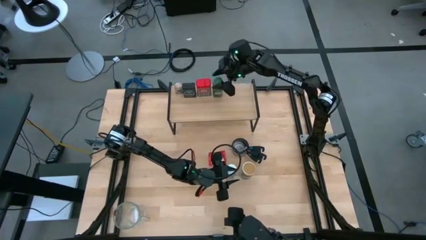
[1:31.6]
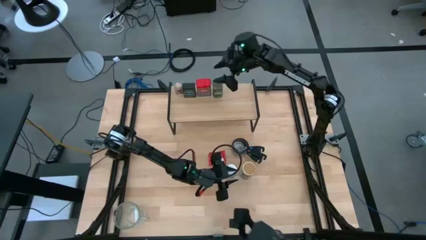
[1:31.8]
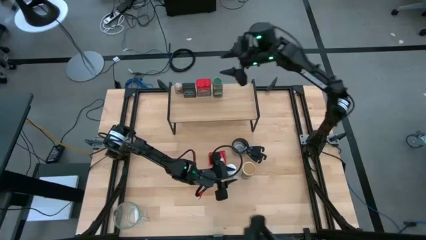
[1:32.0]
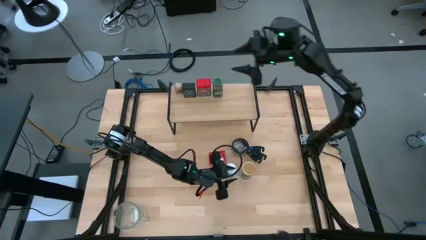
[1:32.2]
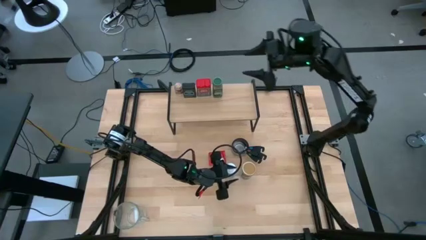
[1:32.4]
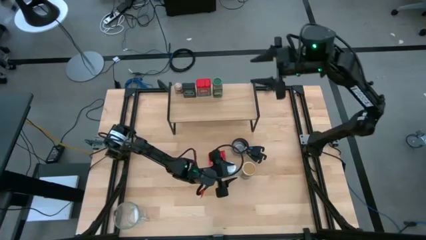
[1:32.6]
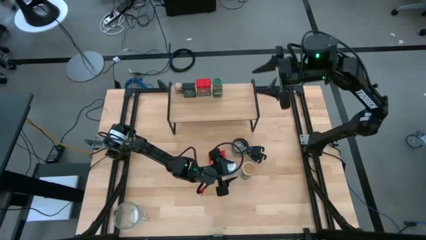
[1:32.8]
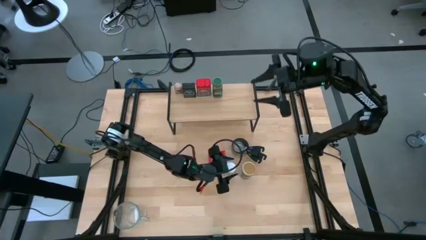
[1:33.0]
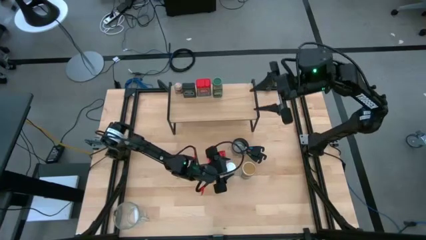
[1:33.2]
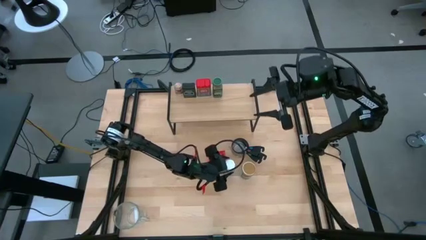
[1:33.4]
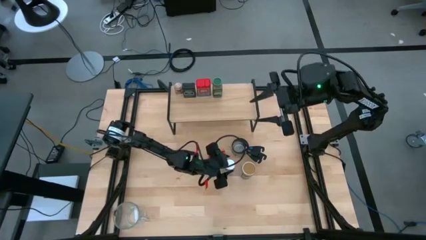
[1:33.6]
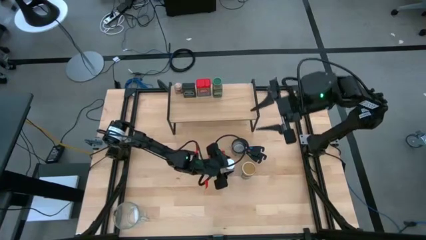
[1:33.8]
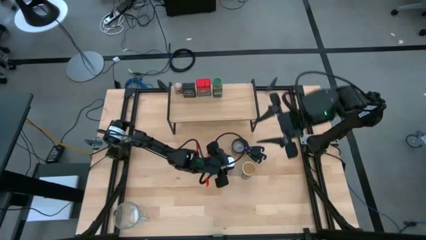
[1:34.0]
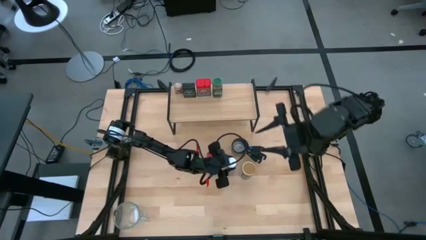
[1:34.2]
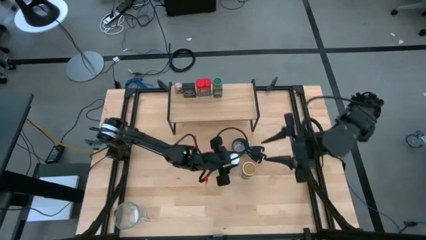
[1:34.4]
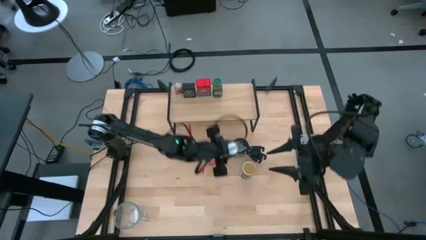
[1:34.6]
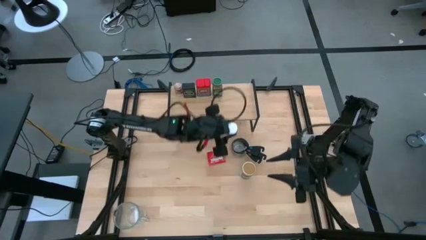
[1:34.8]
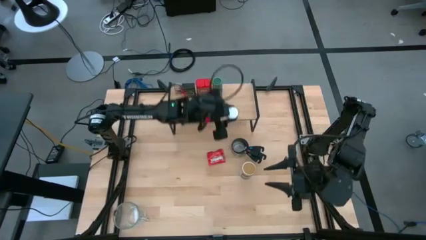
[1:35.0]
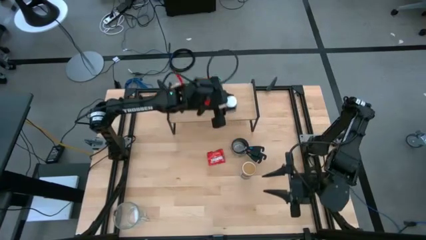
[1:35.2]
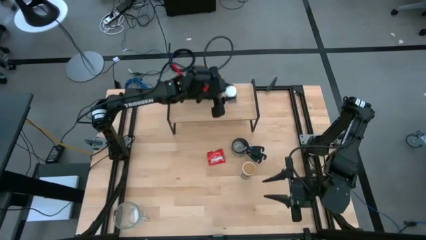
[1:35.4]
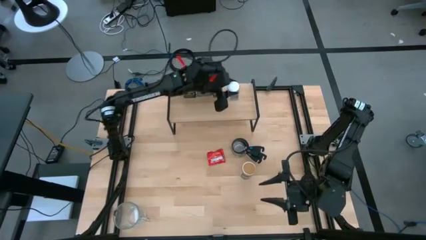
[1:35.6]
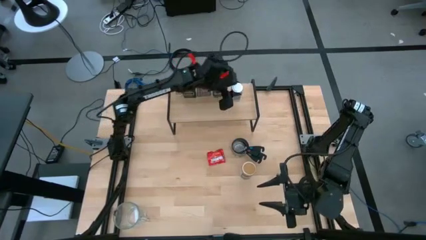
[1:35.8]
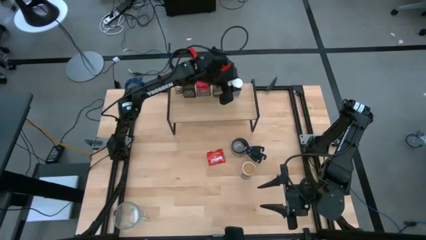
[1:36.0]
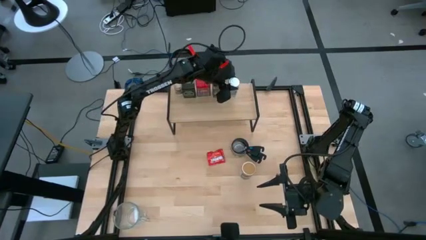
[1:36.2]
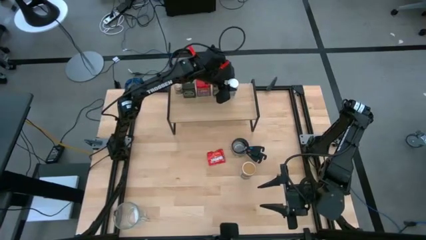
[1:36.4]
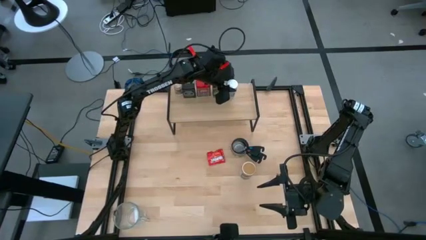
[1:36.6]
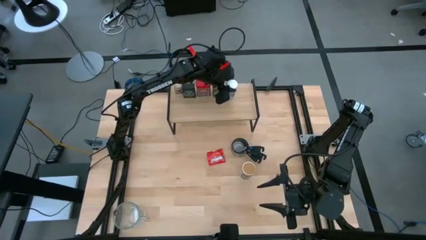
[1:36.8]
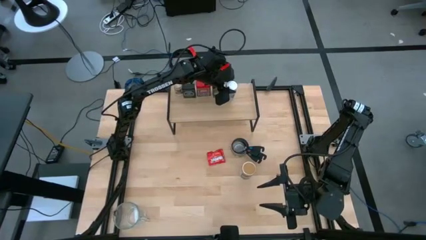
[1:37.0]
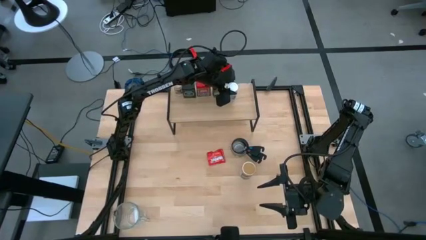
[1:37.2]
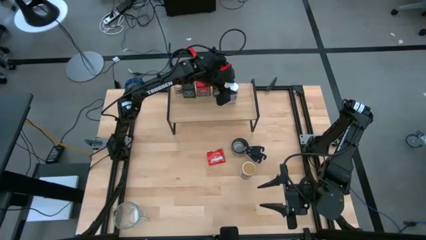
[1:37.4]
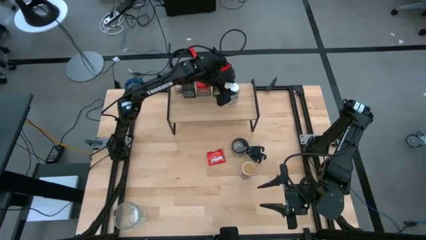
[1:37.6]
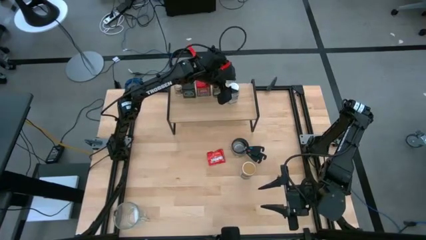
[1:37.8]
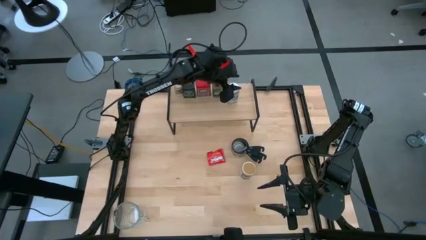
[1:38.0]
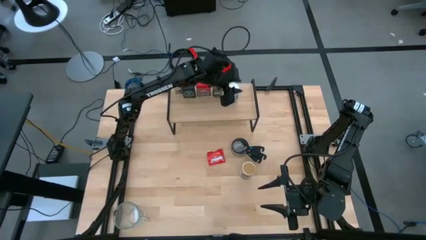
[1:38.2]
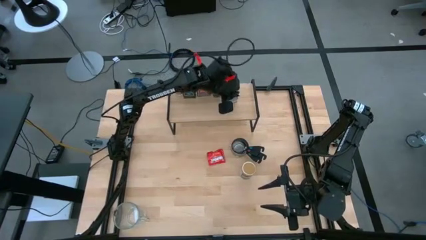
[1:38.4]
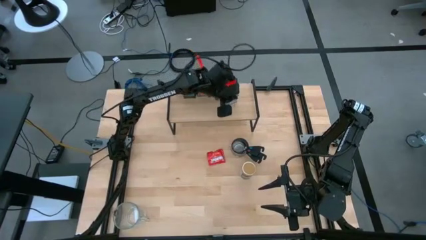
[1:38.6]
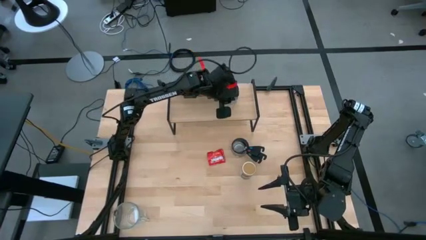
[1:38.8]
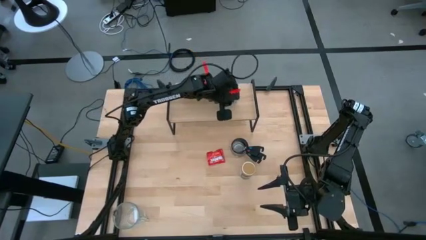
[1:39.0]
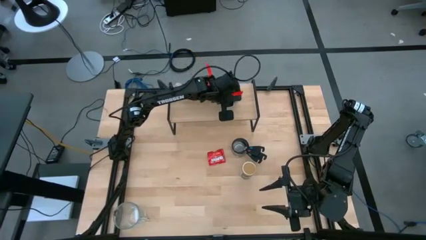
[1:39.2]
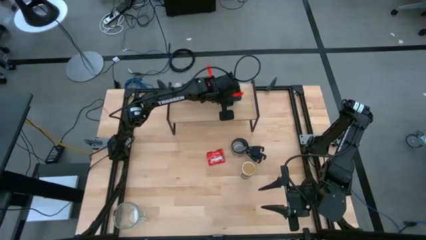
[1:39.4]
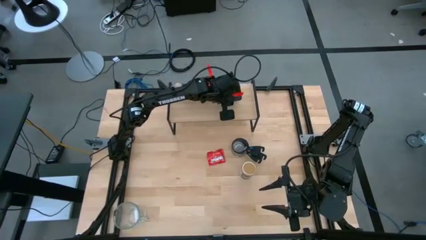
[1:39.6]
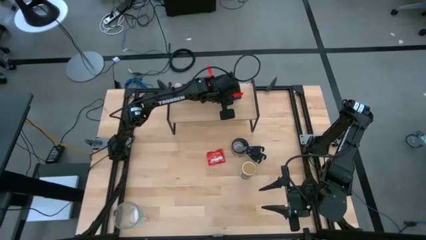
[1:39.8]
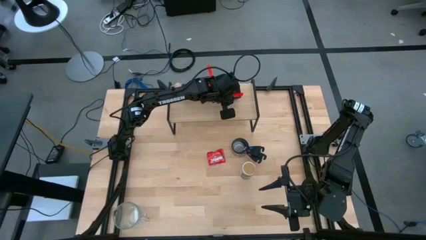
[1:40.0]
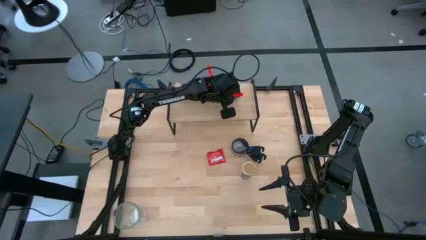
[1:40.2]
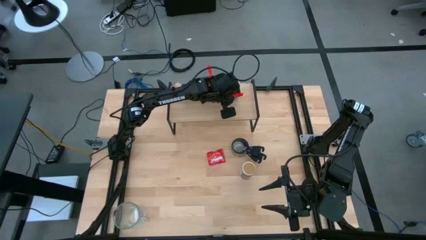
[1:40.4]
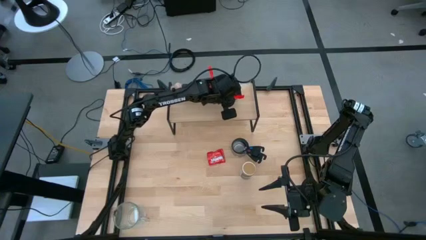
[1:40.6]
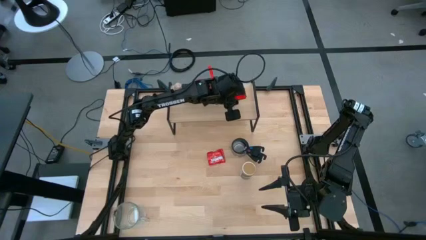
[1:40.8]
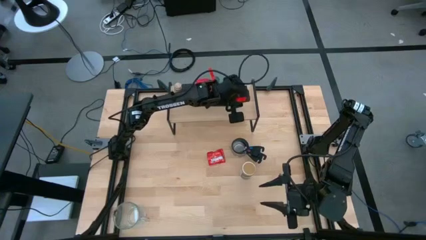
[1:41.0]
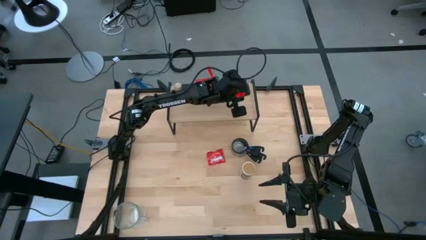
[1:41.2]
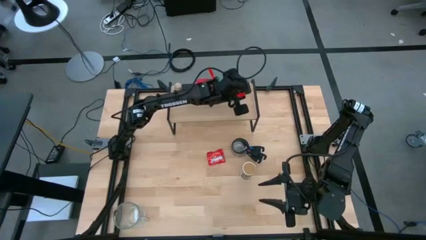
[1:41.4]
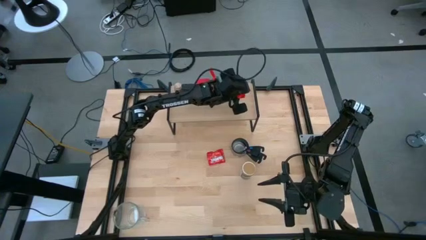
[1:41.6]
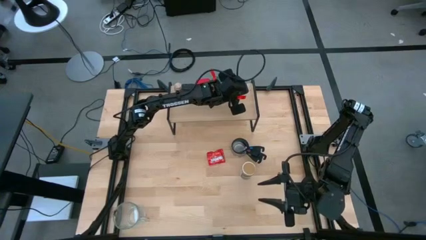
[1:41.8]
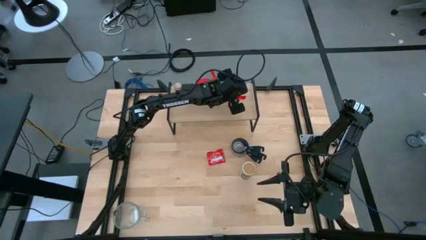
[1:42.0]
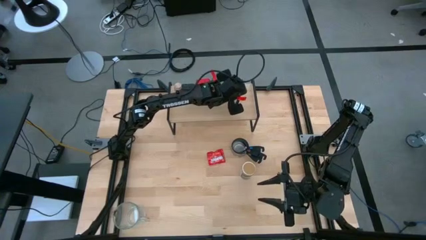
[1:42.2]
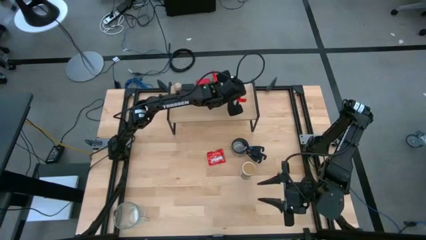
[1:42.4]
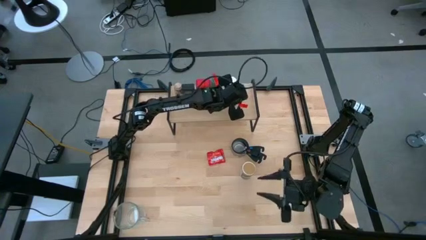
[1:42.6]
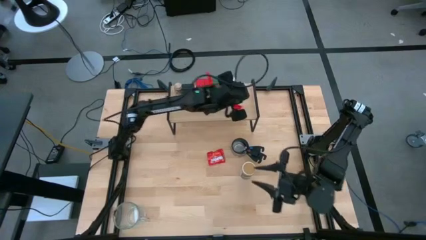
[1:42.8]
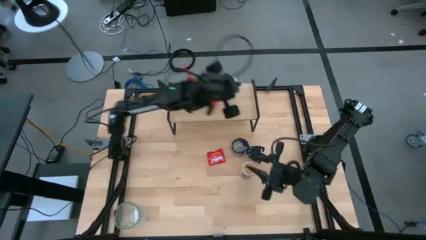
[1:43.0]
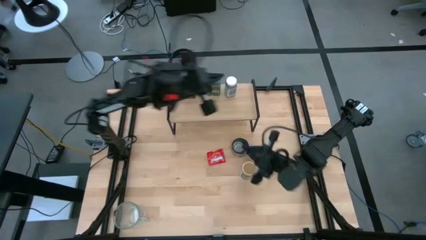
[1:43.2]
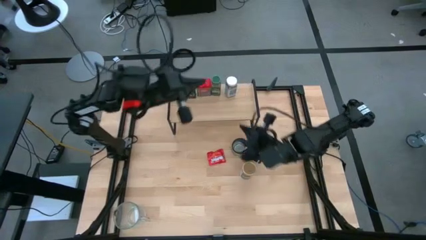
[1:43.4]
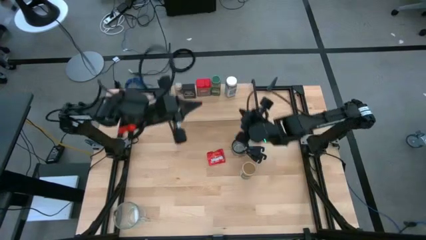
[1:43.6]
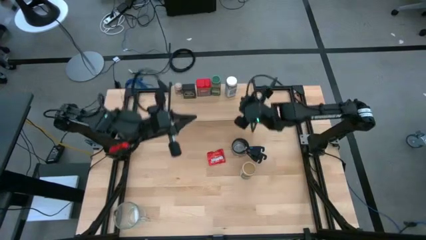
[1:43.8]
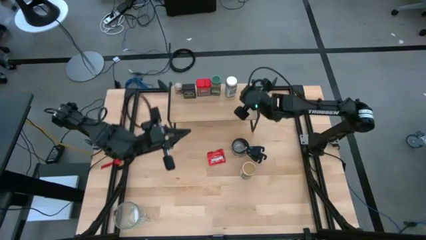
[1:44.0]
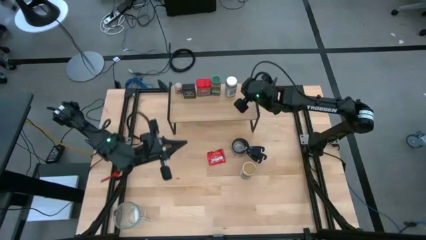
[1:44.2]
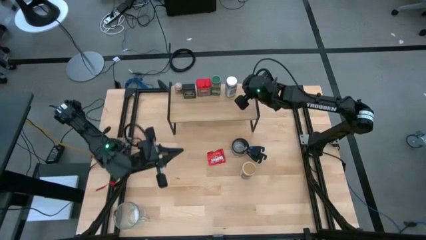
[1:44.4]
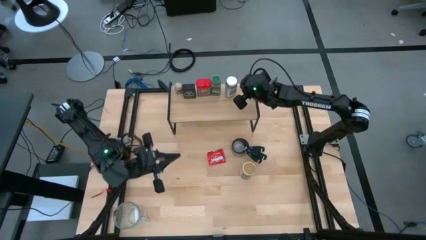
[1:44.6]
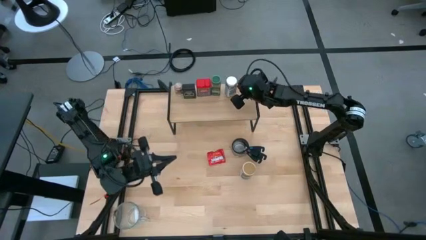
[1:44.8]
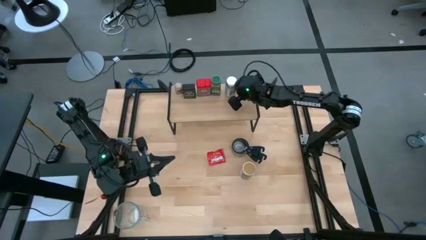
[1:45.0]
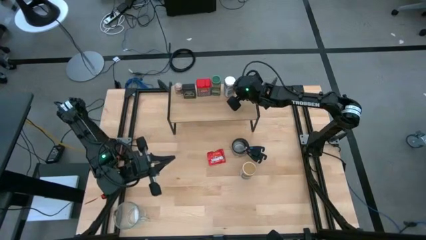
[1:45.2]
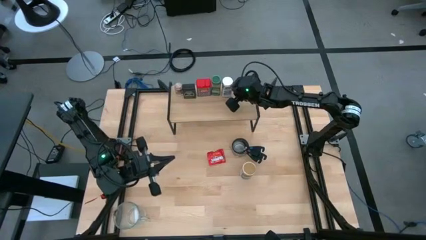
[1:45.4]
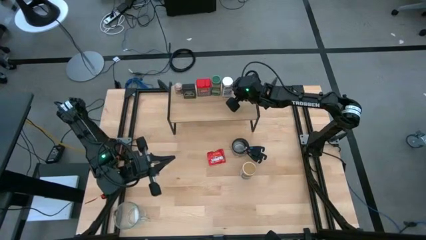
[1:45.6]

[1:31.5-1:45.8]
Task: Shelf spices
Put the white seasoning bottle on the shelf

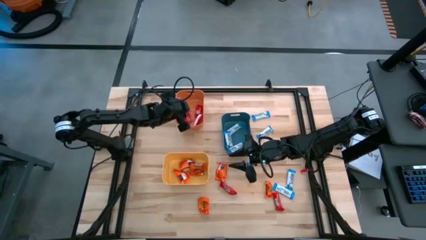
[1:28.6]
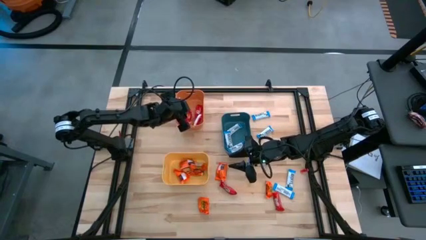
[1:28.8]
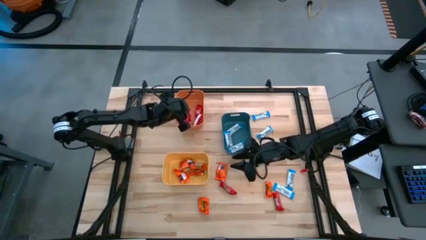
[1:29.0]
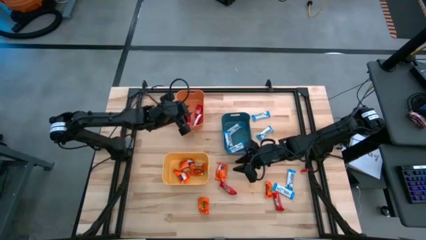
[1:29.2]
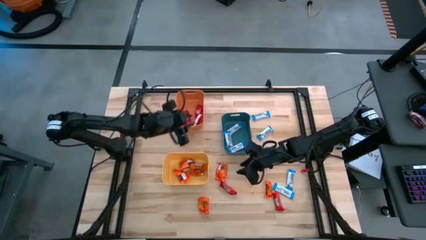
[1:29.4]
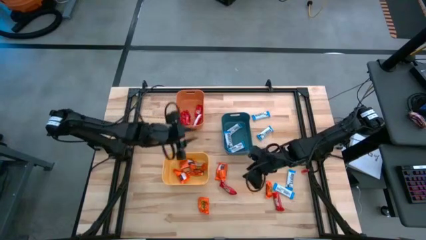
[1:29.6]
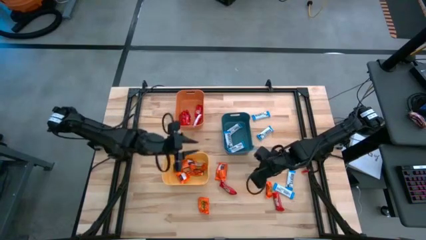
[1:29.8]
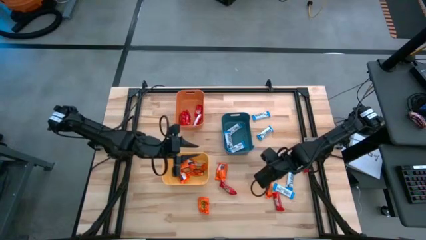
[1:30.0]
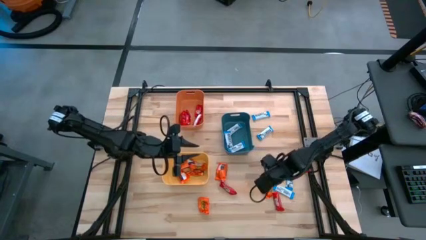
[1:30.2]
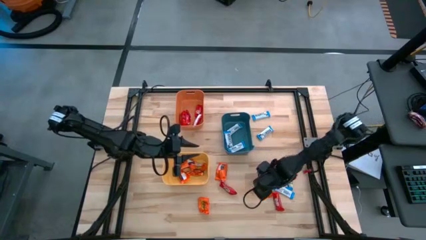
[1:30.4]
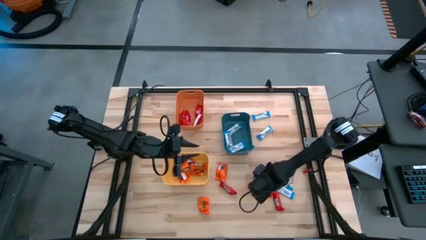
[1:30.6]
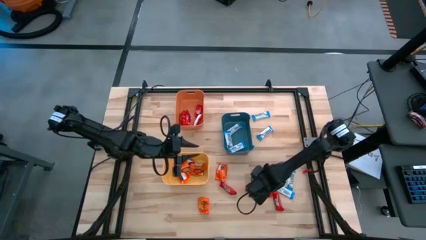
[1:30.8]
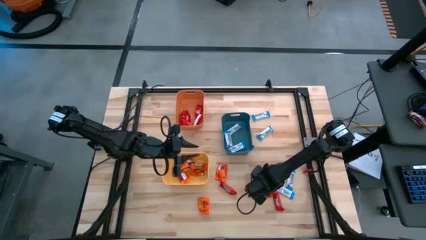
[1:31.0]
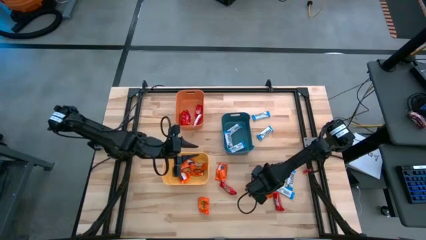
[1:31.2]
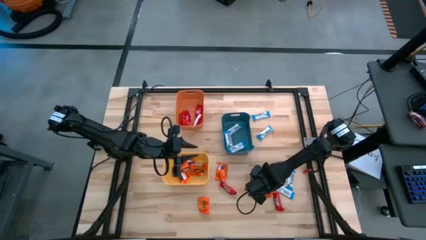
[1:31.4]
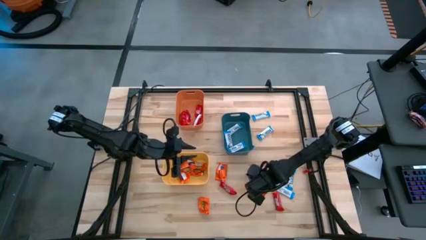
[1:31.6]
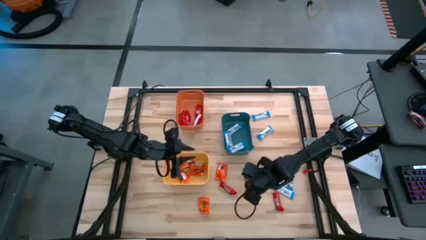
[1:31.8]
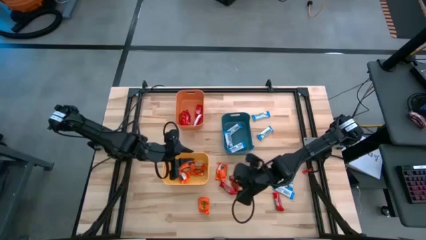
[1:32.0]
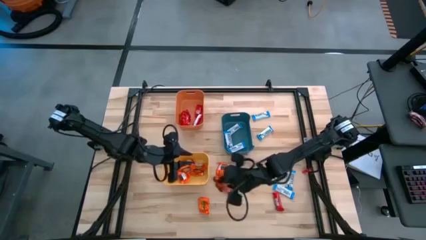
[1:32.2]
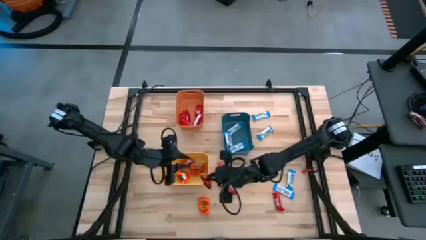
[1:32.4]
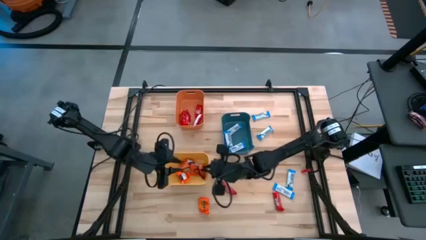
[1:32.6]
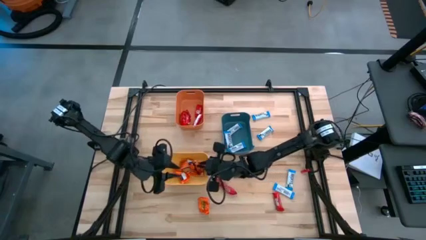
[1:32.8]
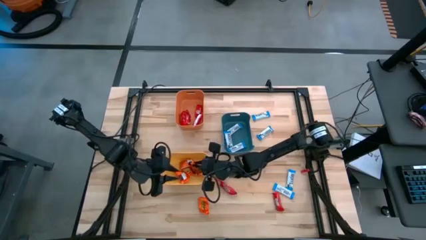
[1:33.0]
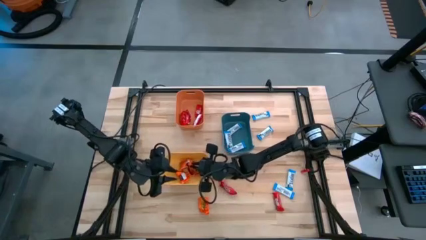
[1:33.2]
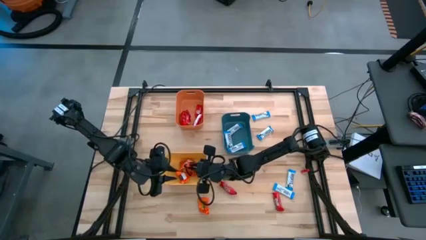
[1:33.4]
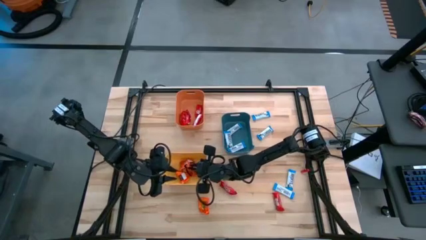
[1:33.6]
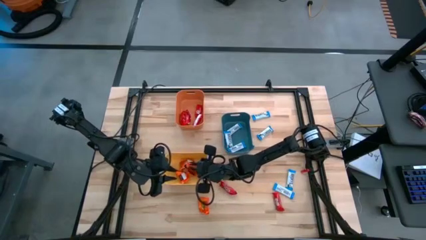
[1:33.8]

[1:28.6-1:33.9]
Task: Organize candy in baskets
Put the orange chocolate into the yellow bin
